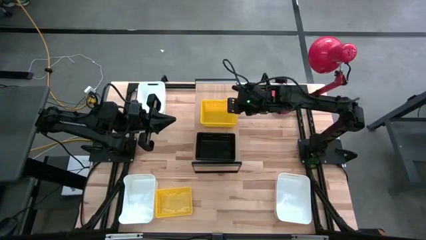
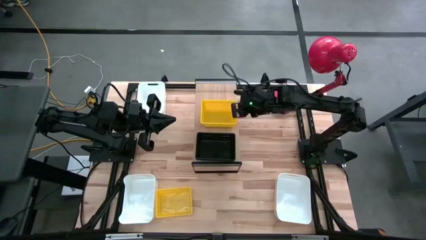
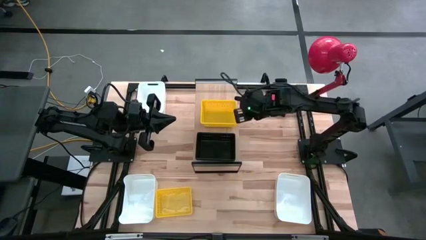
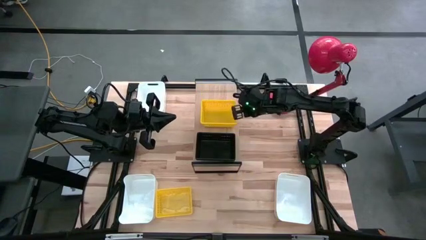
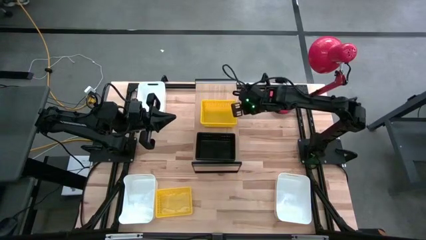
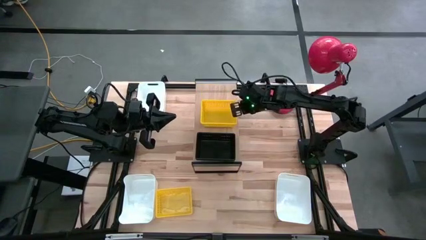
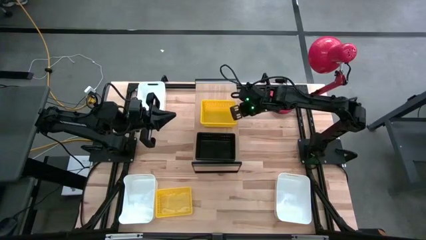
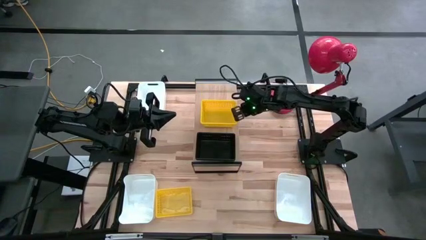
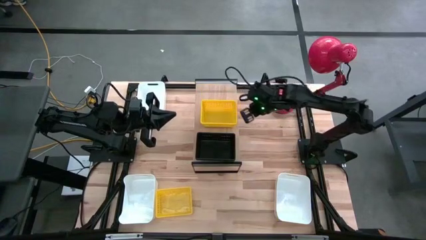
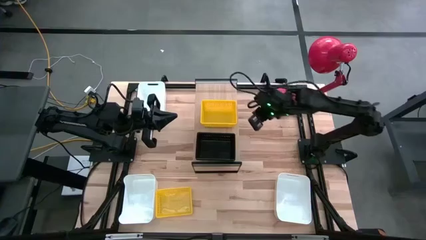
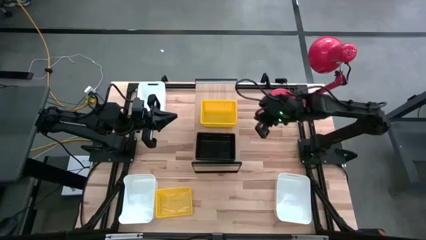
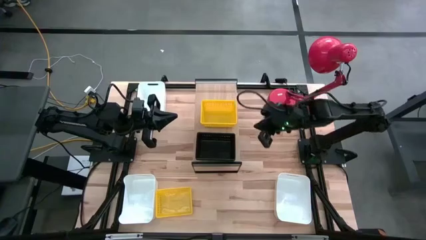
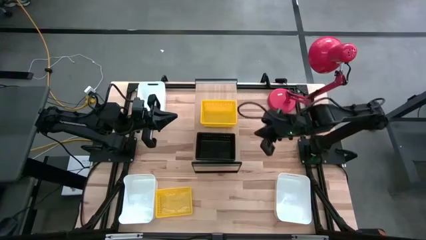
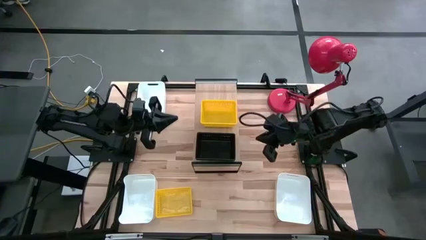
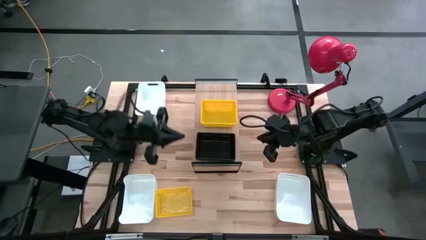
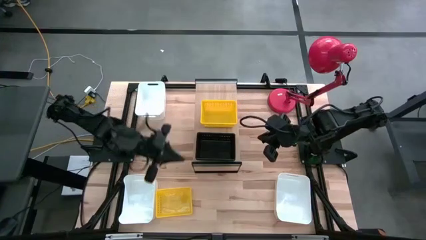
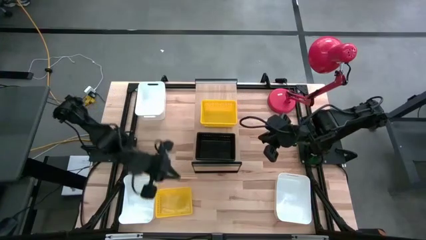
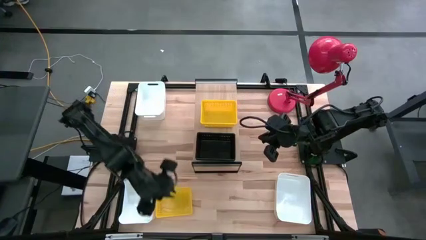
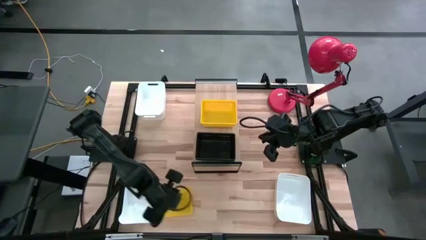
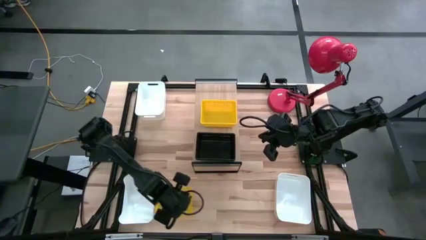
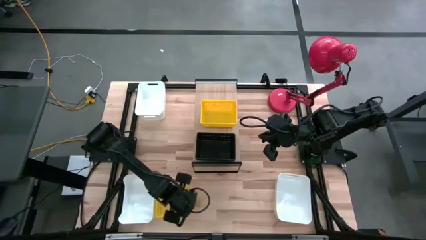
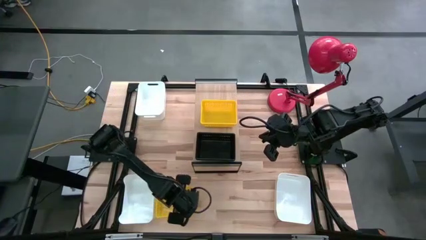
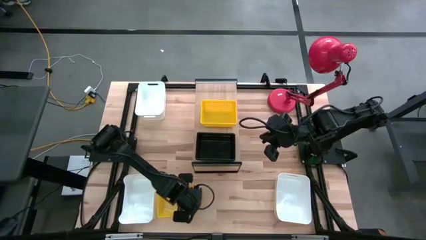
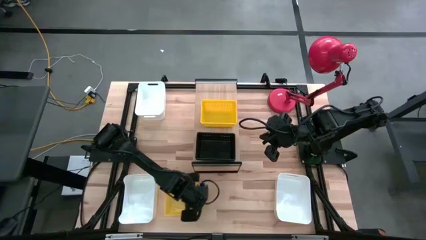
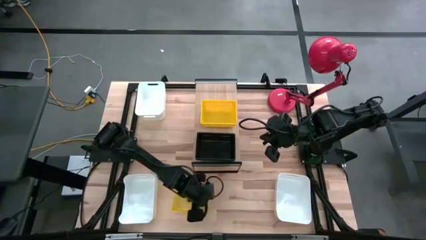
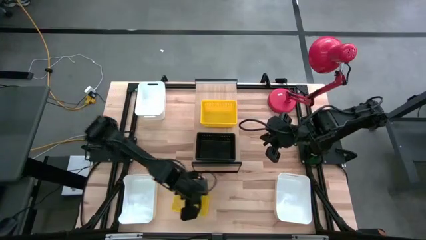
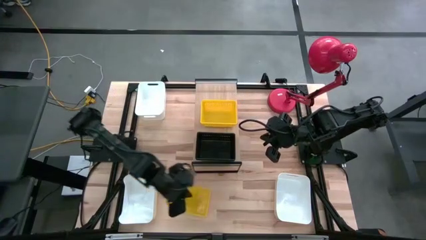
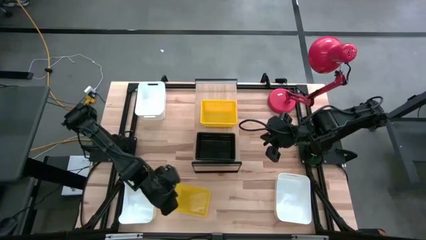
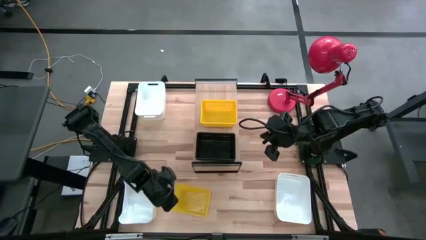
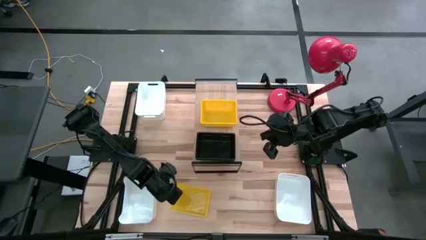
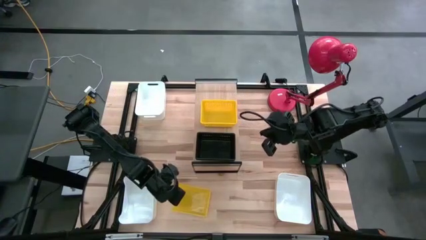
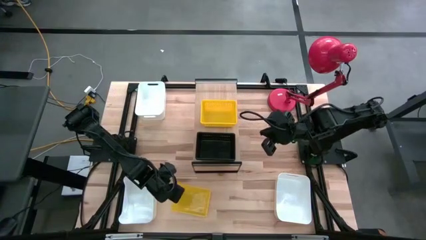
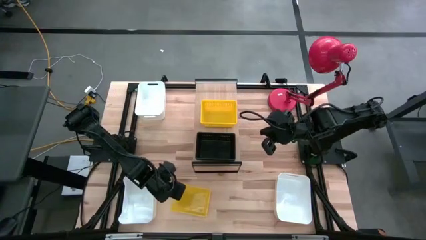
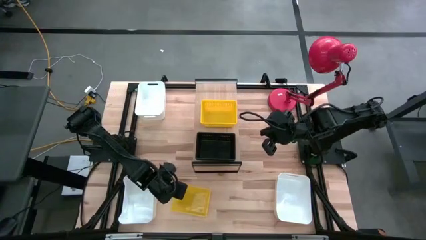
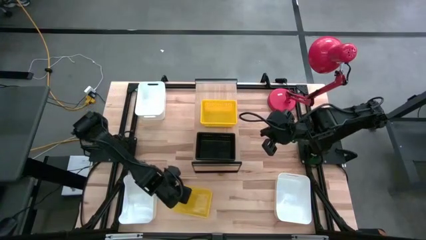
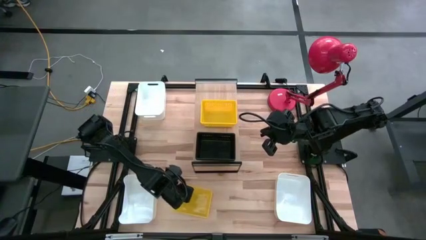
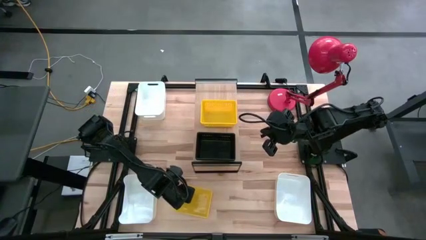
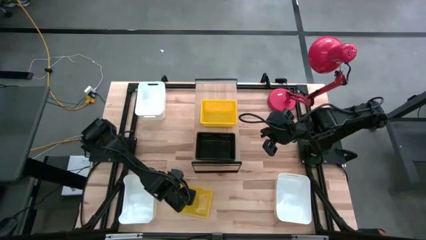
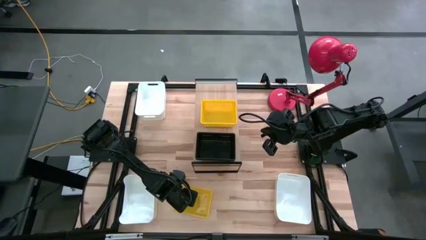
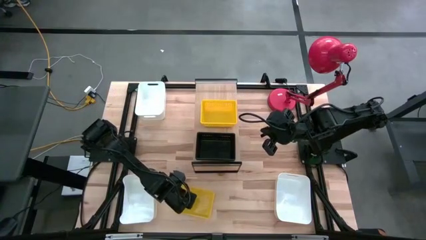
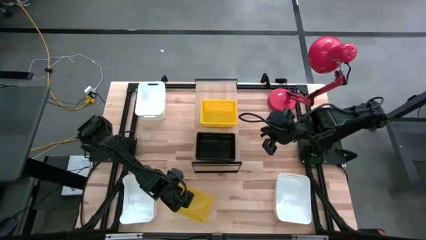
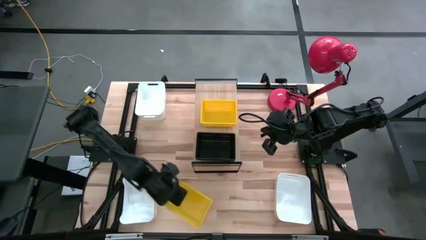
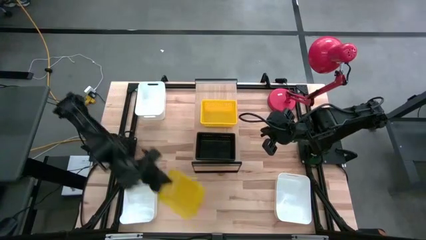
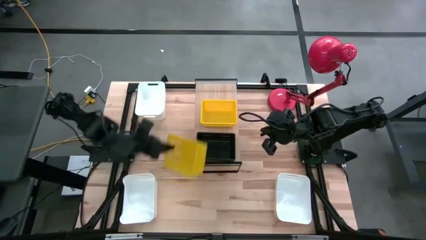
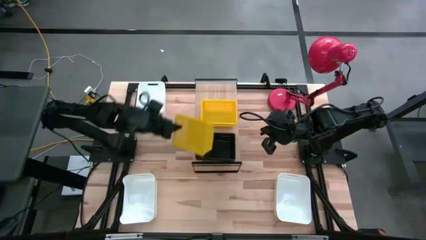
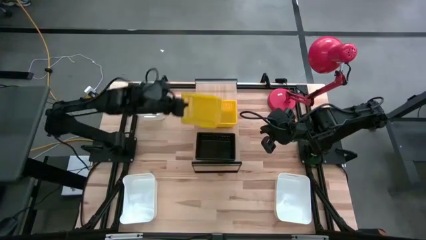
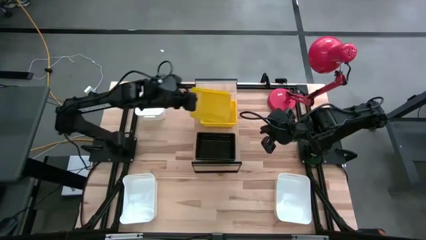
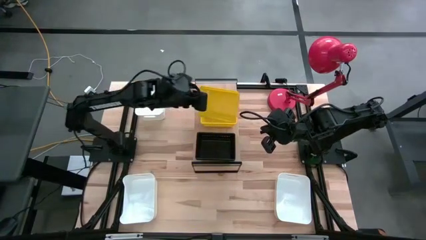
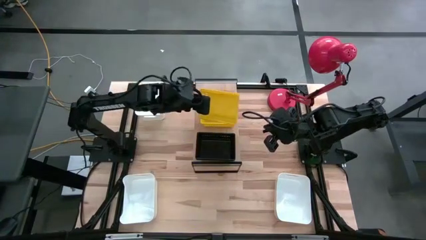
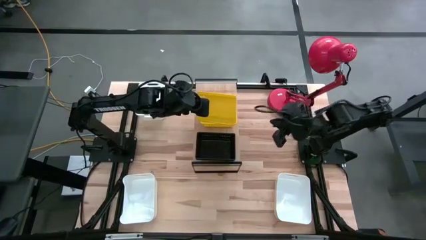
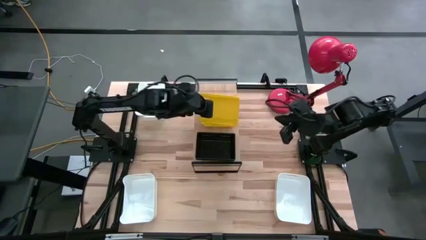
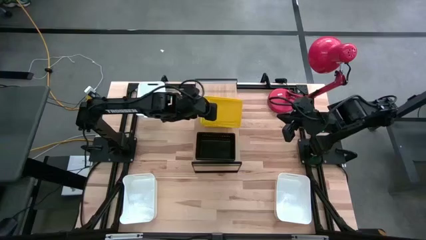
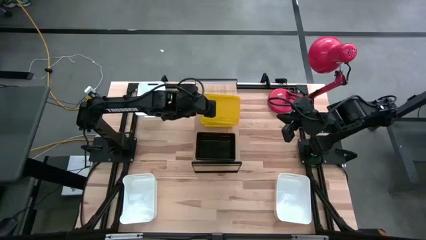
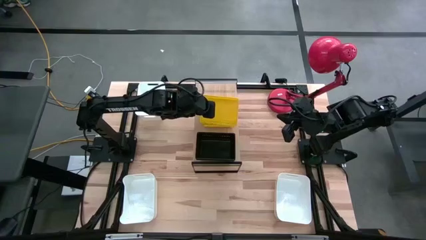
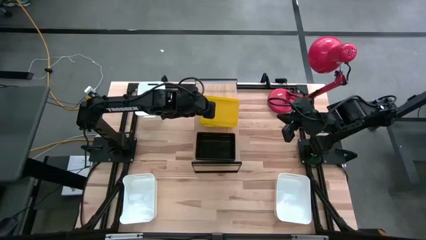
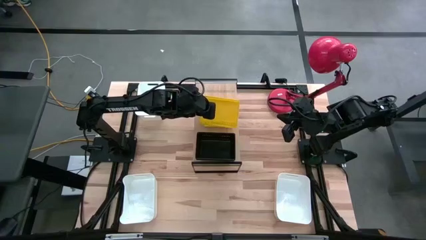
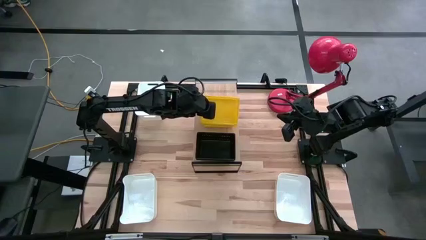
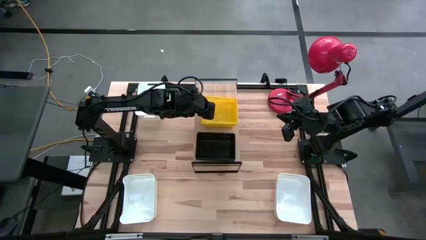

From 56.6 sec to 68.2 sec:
Task: Stack baskets on shelf by color
Stack the yellow bin on top of the yellow bins on the shelf

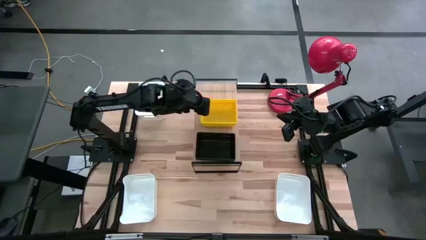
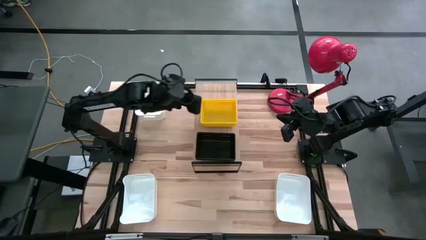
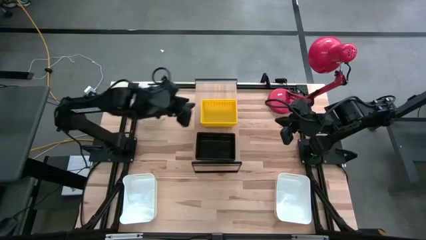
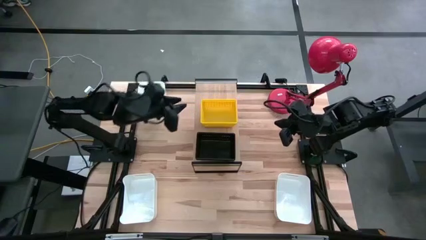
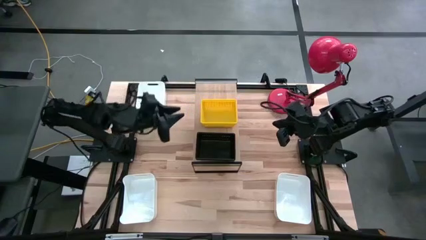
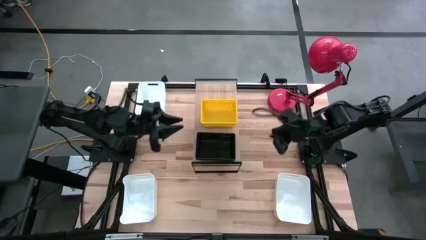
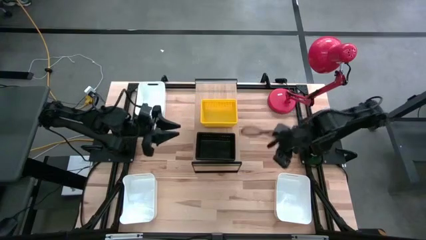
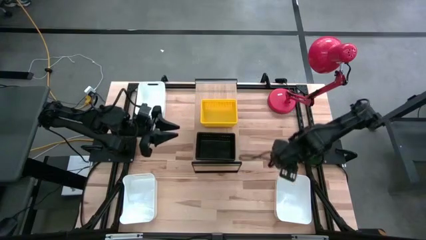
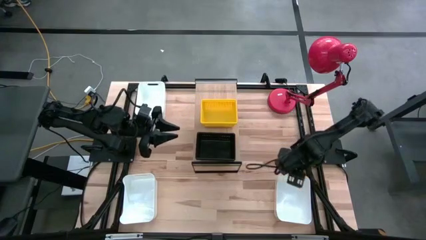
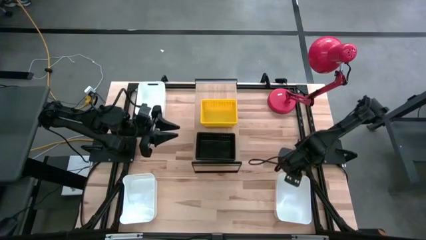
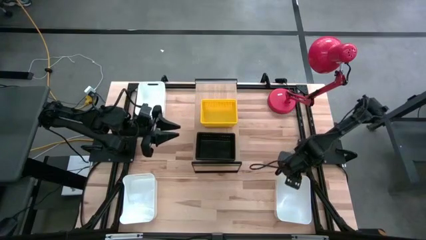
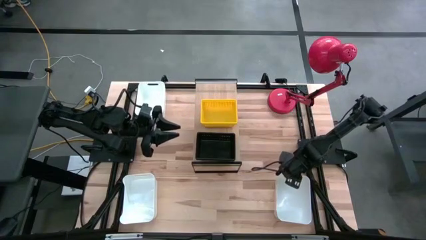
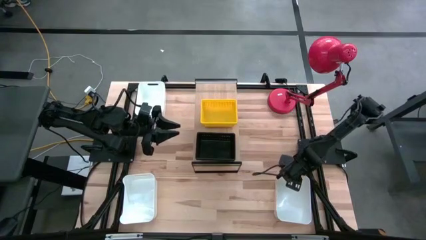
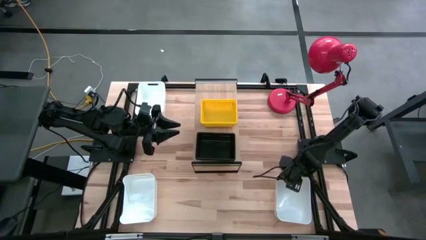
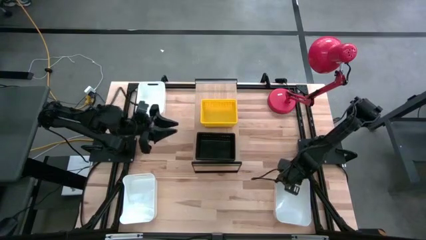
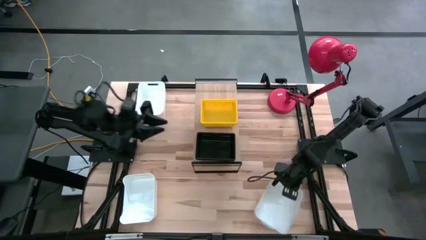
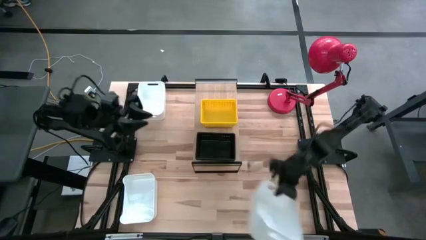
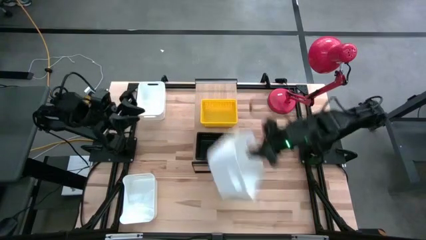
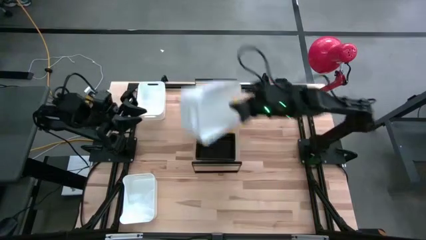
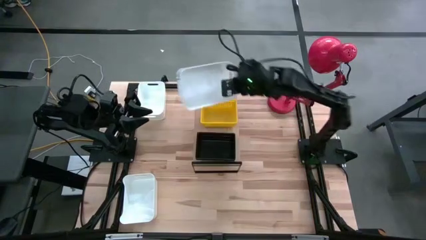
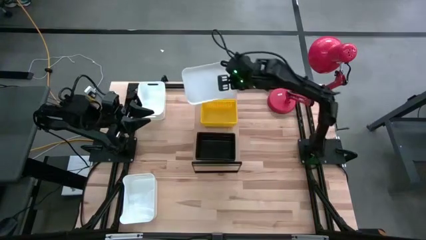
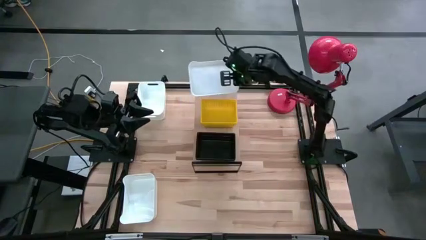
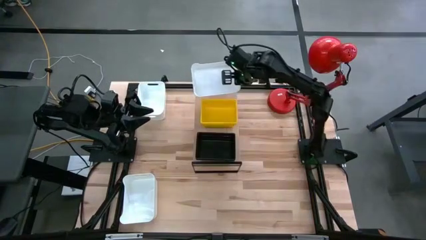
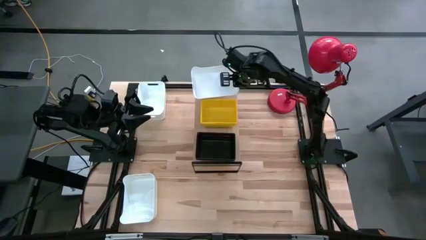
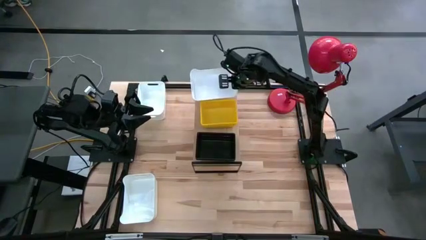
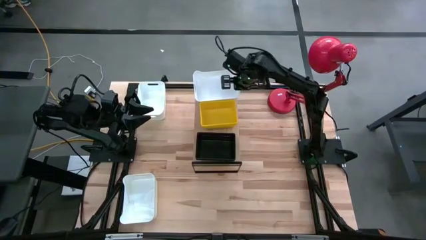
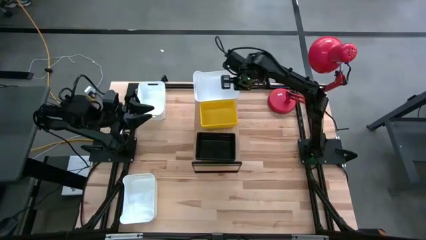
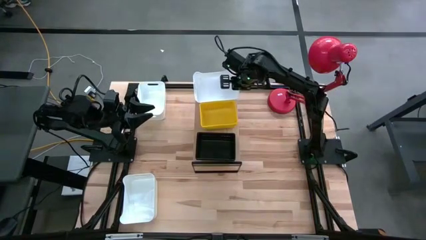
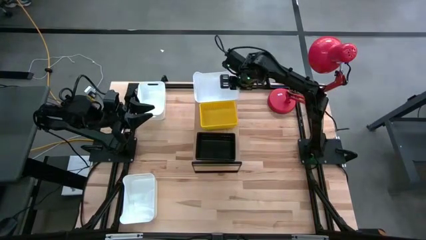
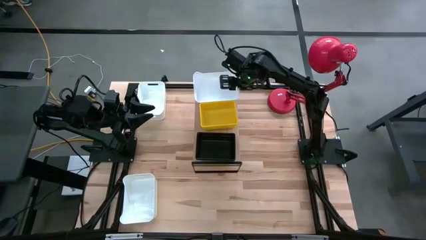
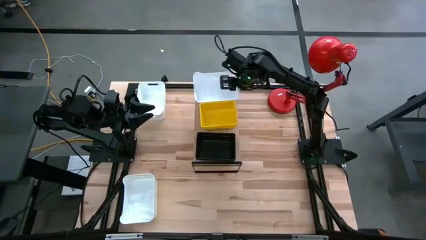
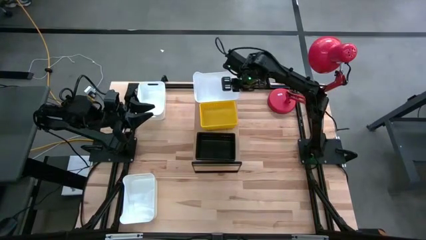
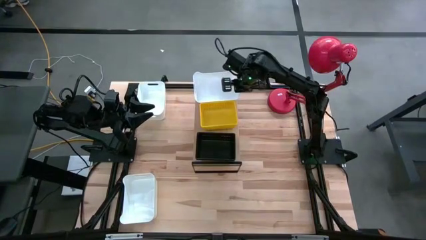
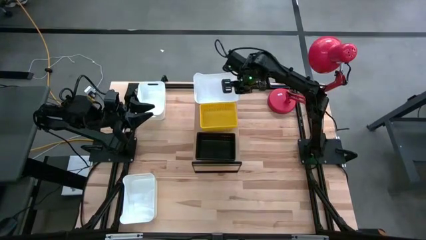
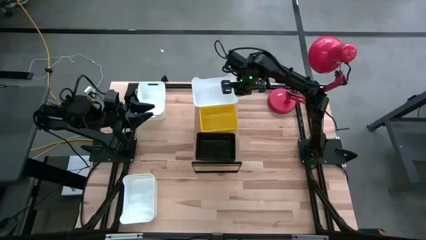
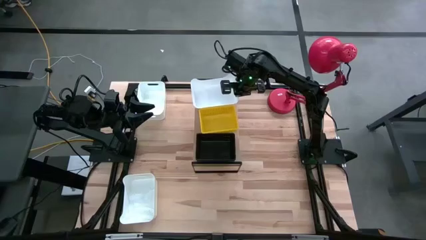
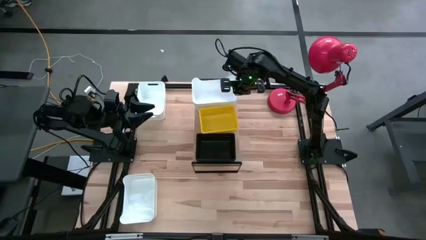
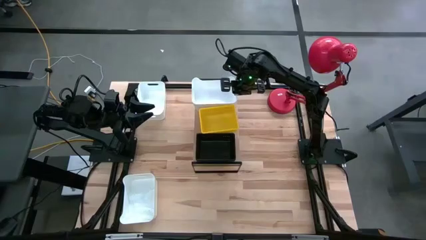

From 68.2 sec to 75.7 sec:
Put the bottom right white bin on the shelf
